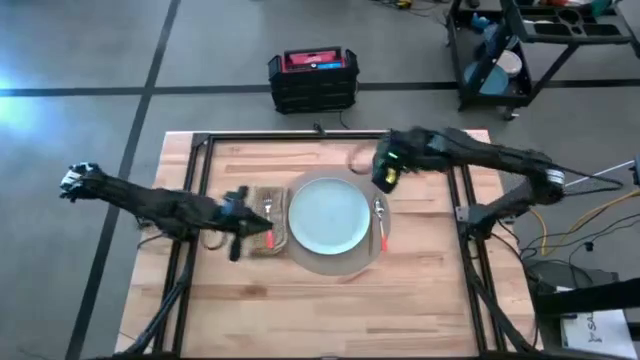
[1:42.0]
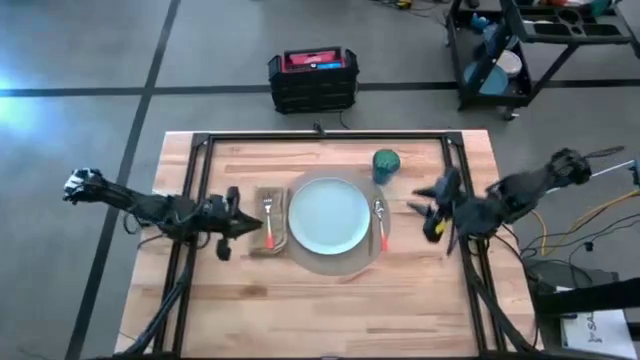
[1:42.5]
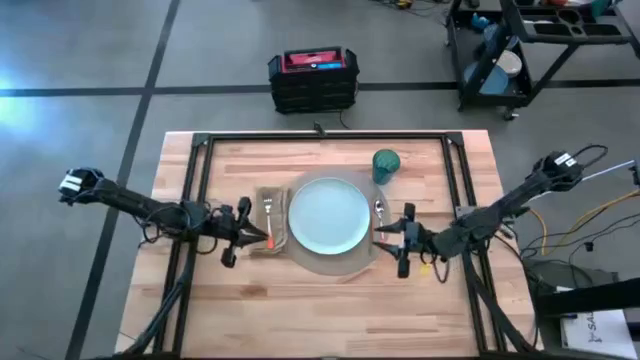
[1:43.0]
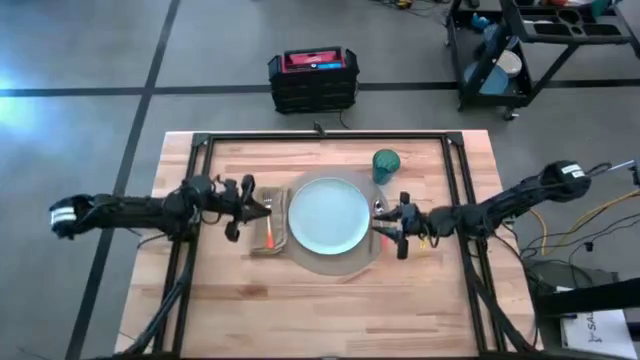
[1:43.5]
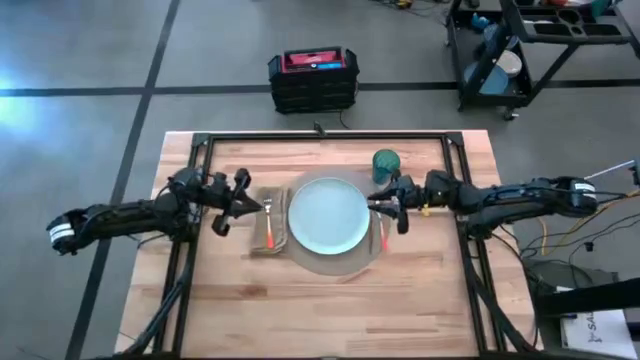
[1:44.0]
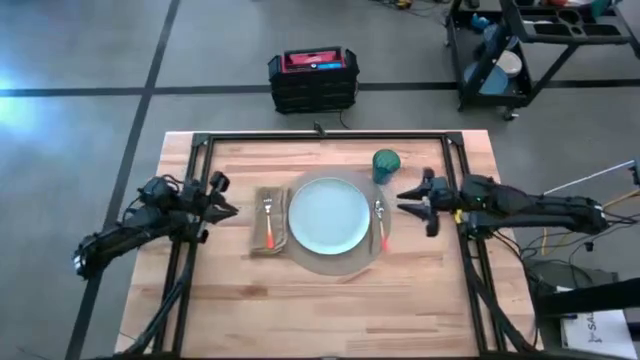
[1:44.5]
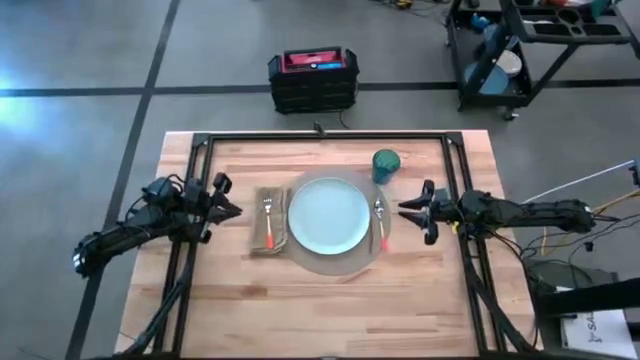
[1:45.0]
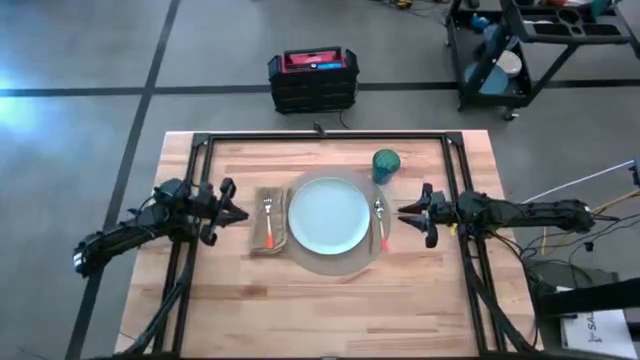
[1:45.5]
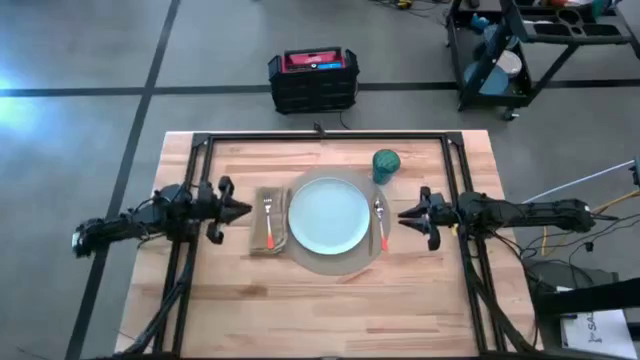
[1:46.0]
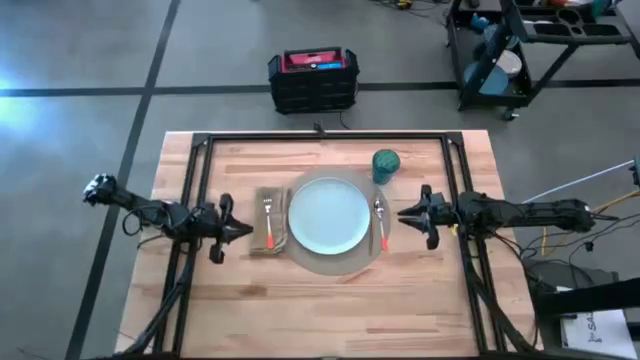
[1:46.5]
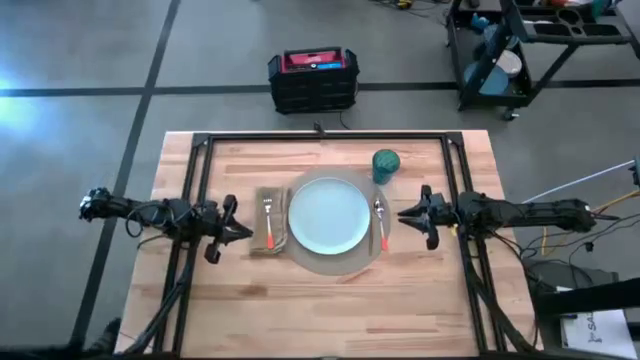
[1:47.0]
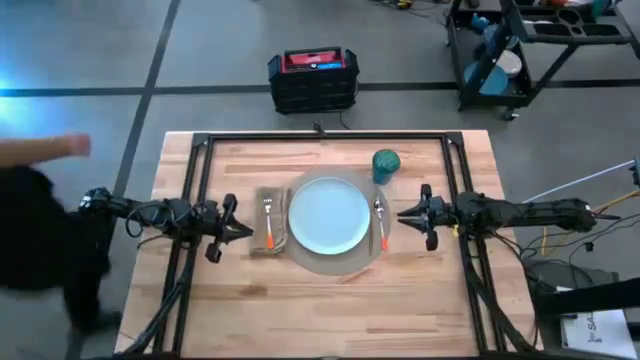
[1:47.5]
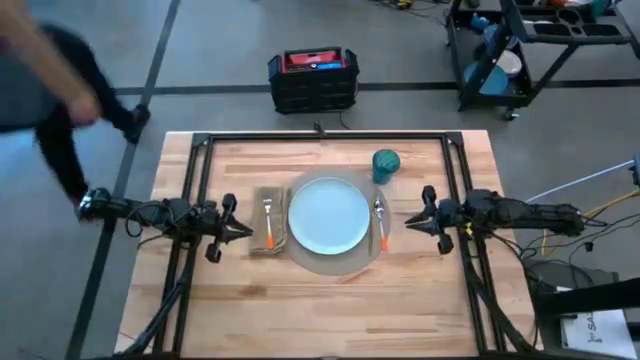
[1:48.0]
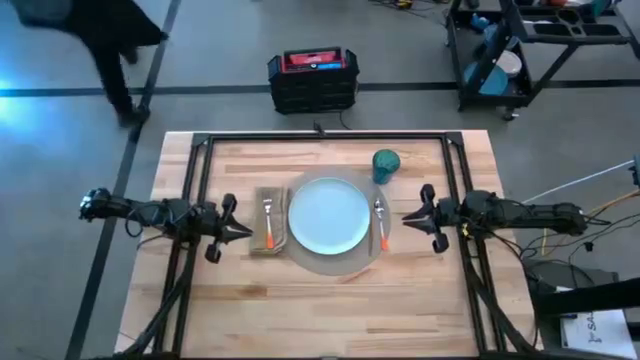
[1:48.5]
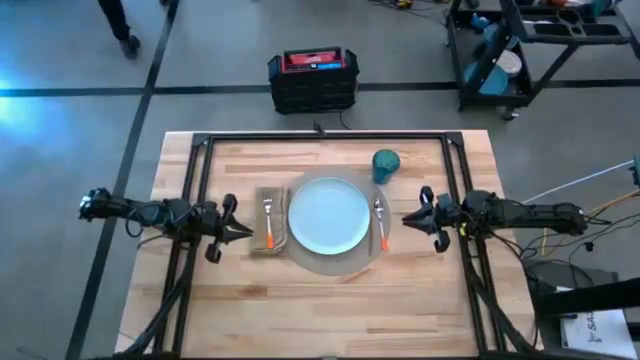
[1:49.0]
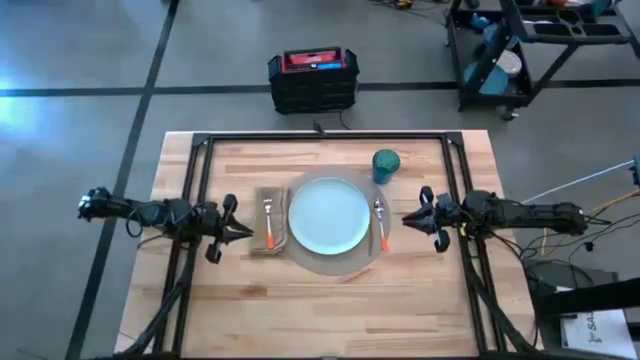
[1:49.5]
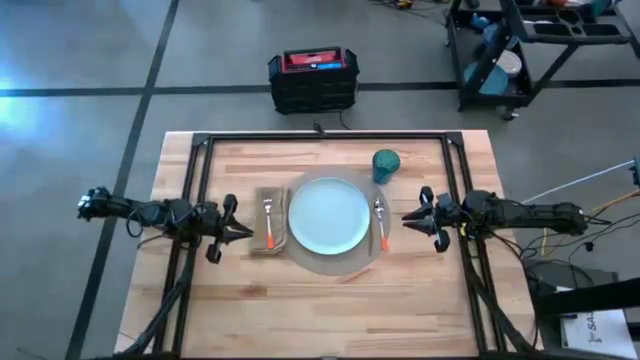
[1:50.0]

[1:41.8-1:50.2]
Task: Set table place
Return to Home Position

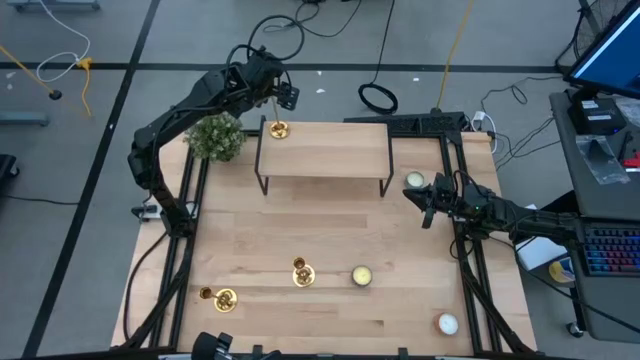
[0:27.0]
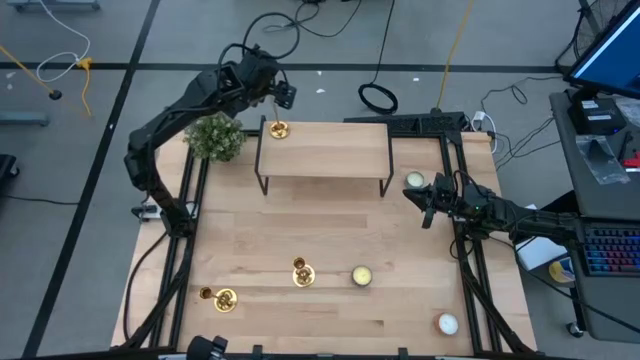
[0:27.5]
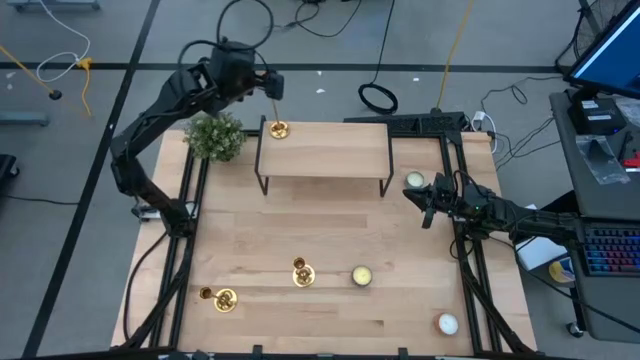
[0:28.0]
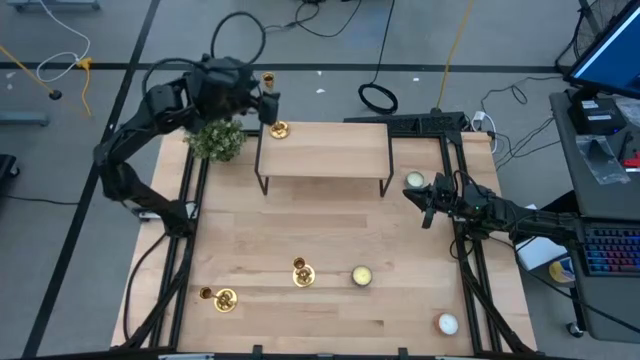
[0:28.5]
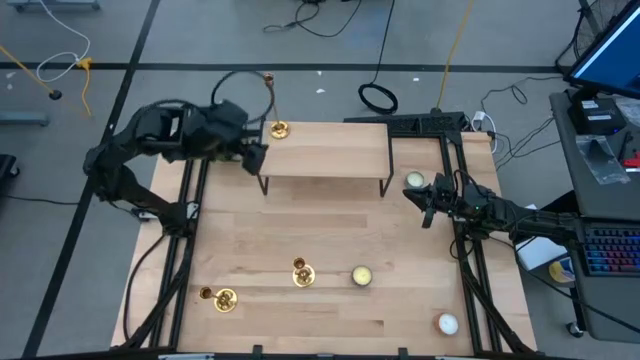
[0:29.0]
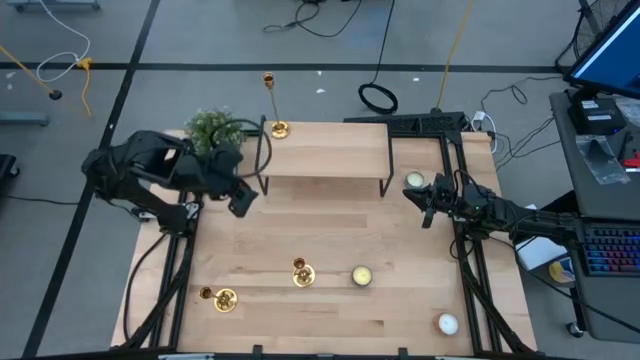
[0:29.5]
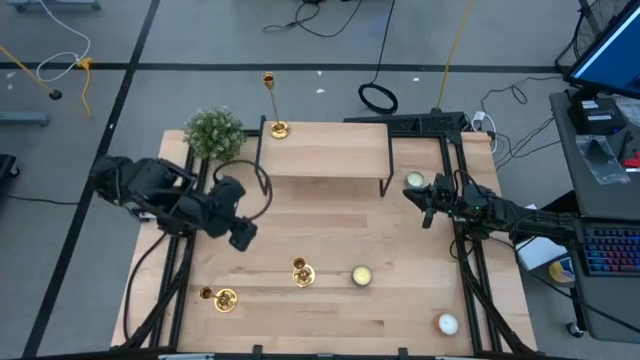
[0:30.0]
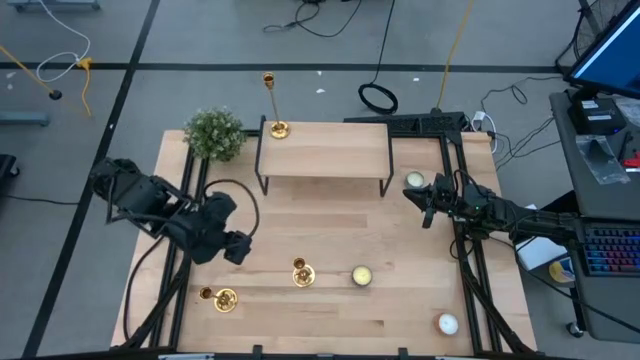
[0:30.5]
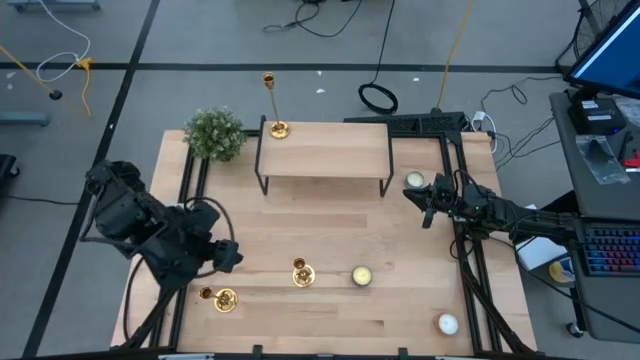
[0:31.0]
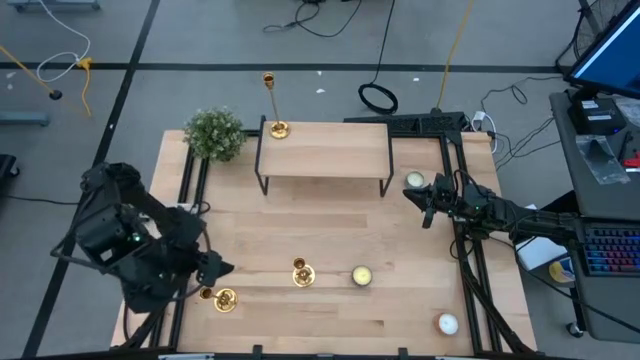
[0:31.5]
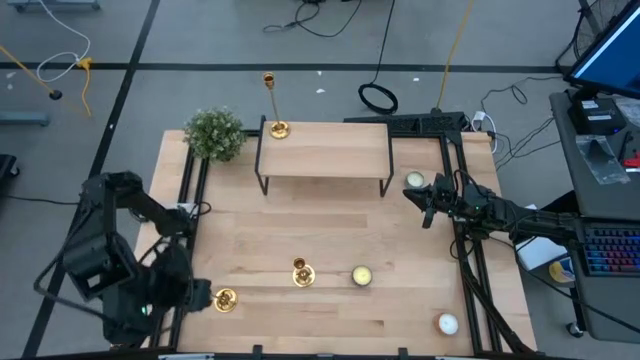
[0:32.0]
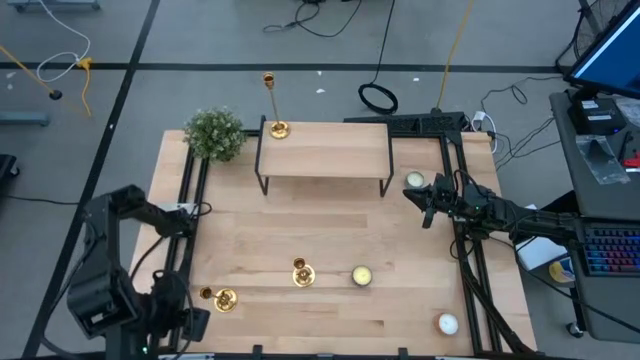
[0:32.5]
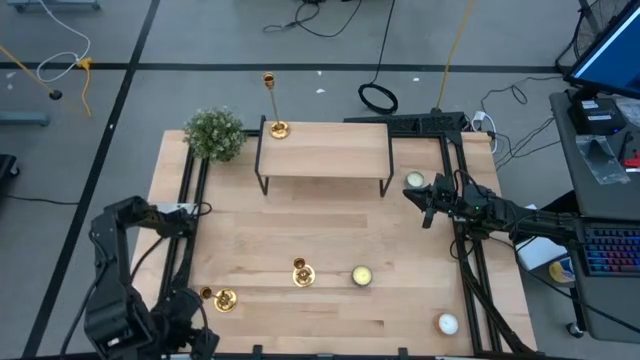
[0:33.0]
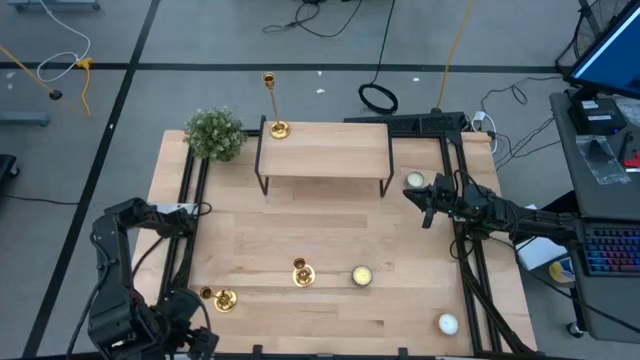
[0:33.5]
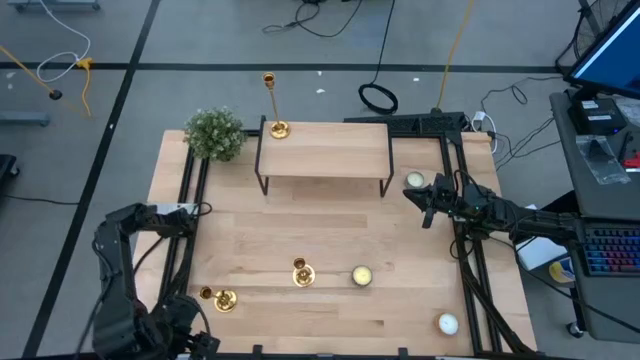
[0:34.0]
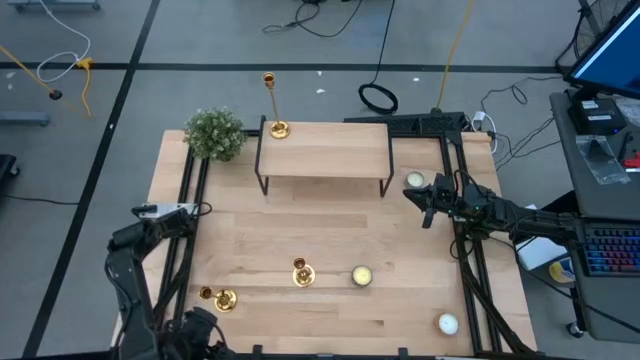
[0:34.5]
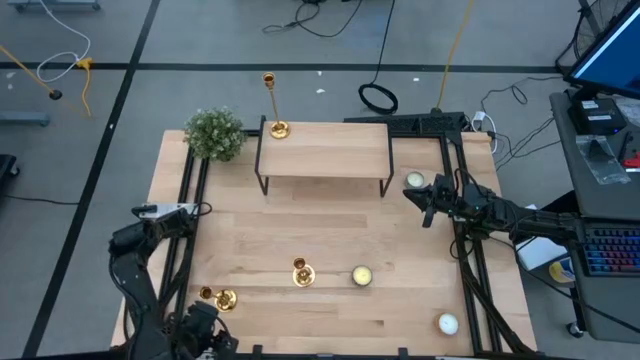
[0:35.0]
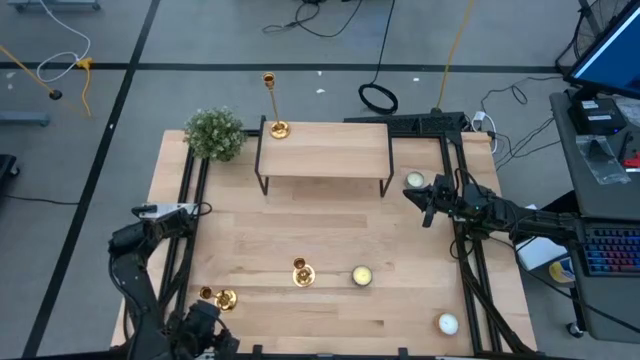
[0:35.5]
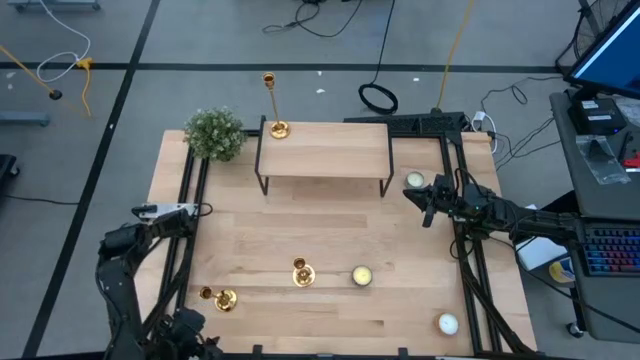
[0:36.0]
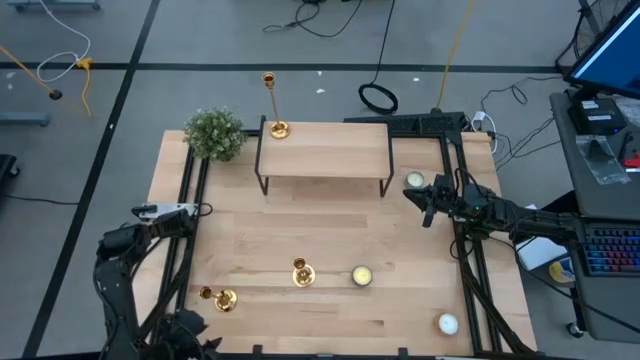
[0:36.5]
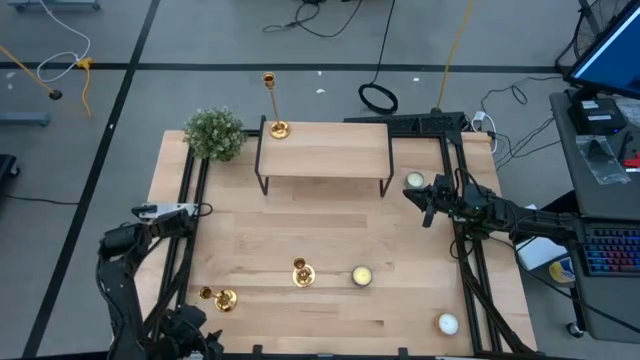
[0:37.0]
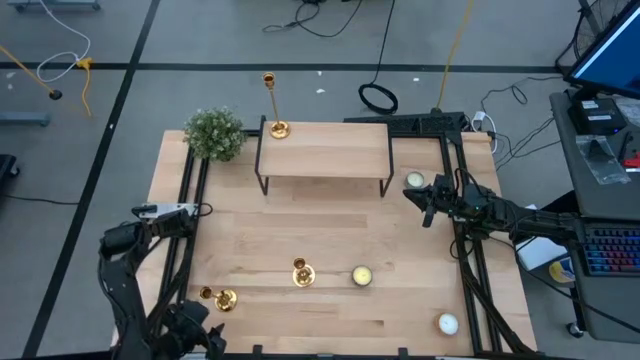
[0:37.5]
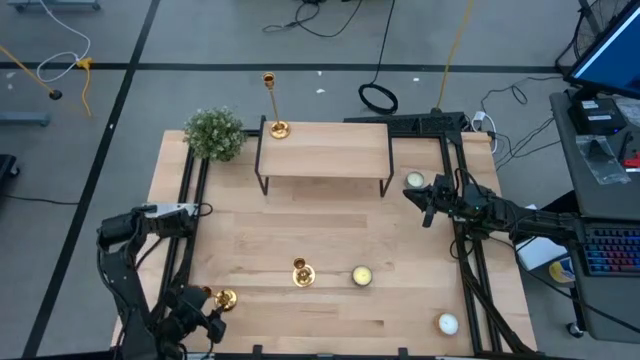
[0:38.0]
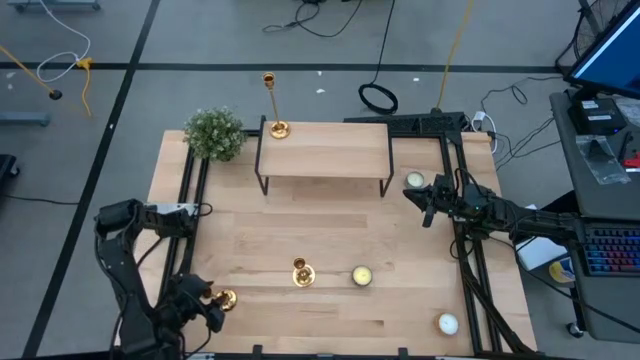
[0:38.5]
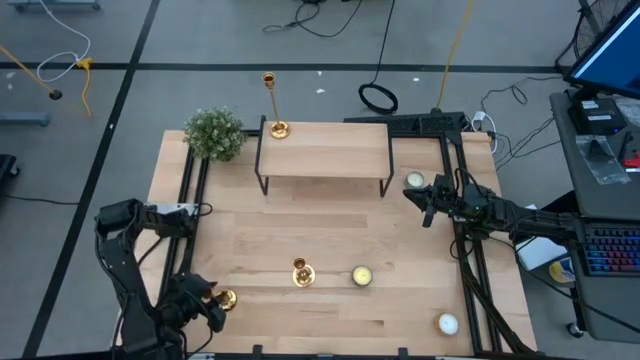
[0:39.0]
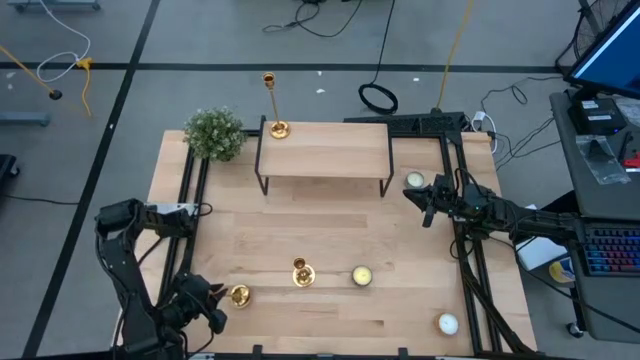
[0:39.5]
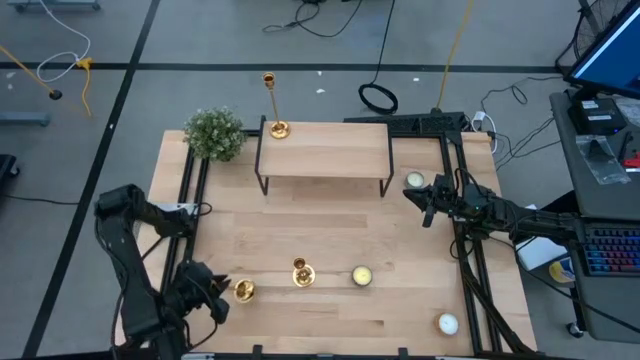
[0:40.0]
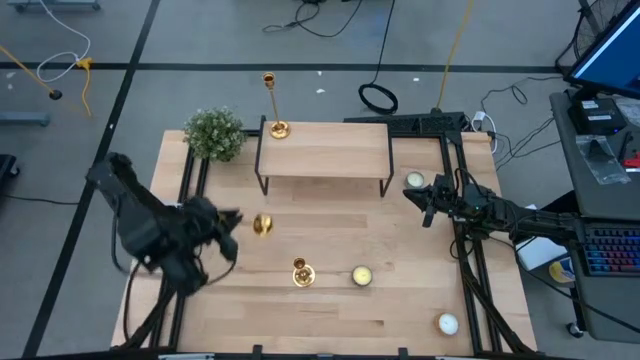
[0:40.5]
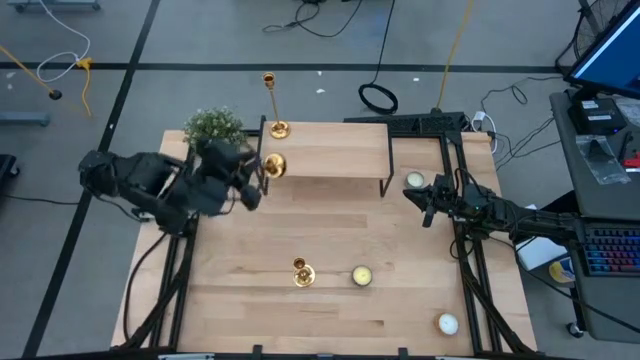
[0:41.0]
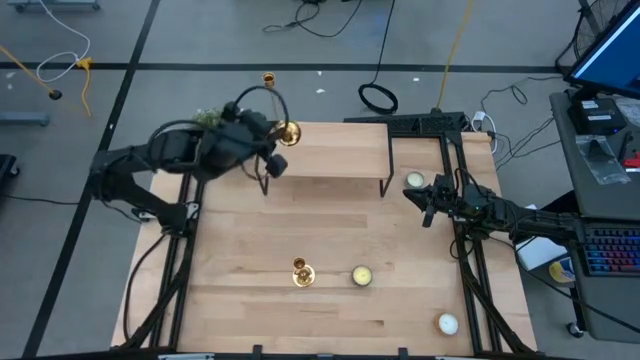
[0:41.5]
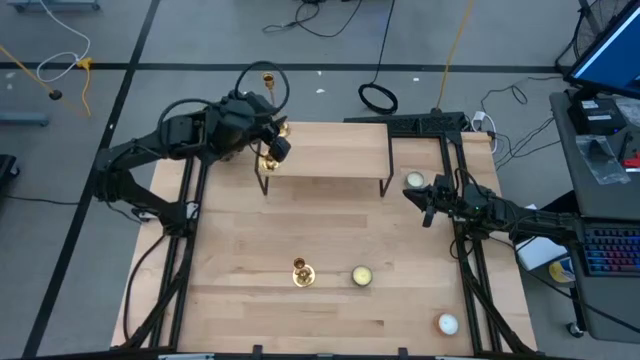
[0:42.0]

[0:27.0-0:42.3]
Task: Pick & Place candle stick holders
Put the bottom gold candle holder on the shelf
